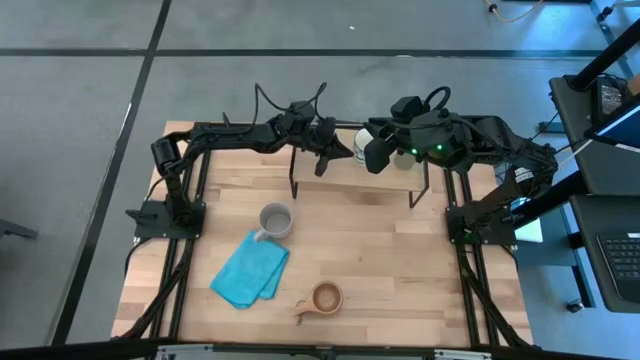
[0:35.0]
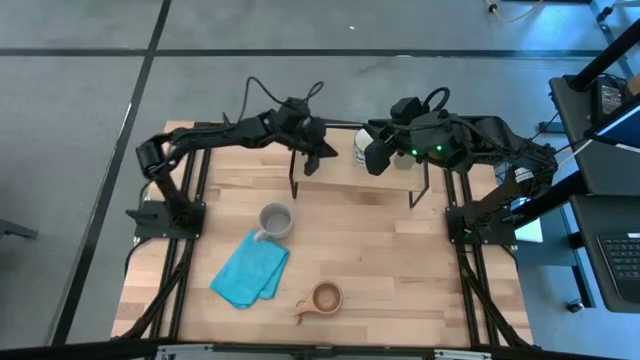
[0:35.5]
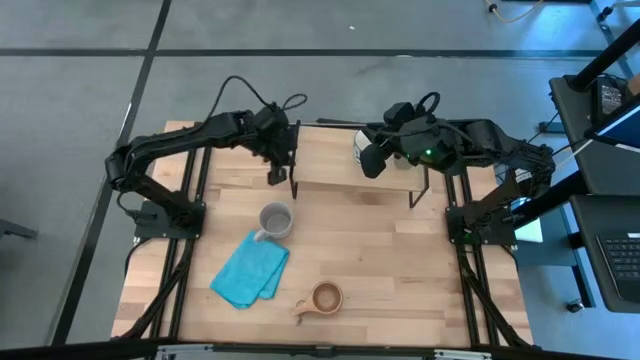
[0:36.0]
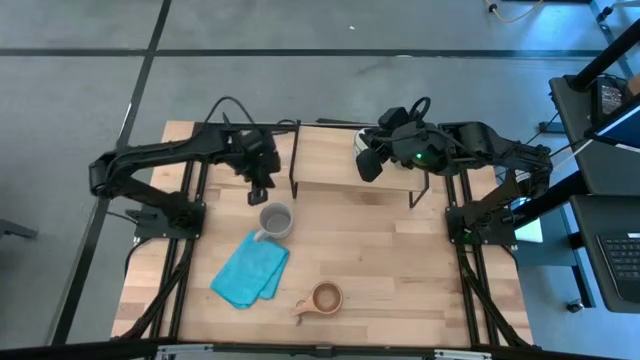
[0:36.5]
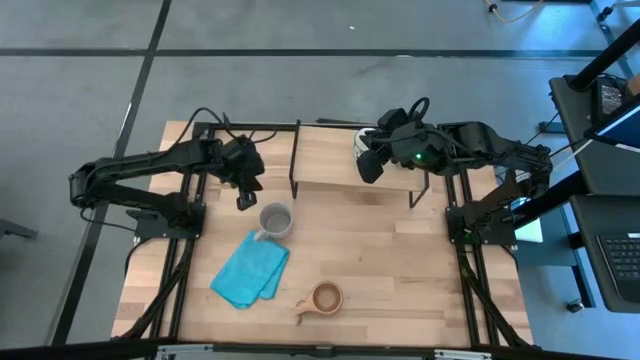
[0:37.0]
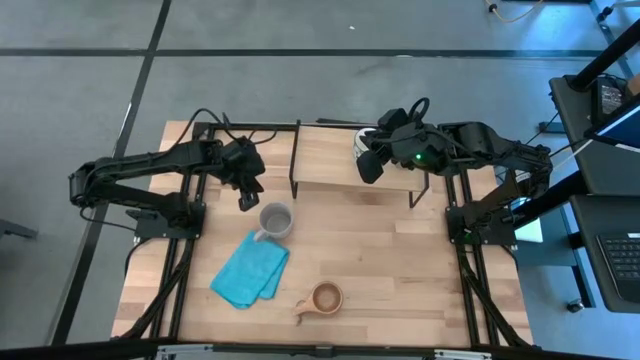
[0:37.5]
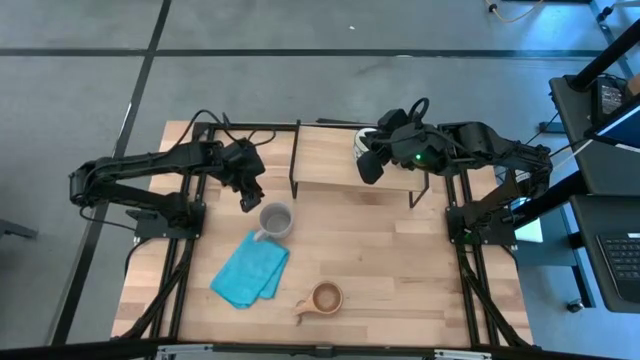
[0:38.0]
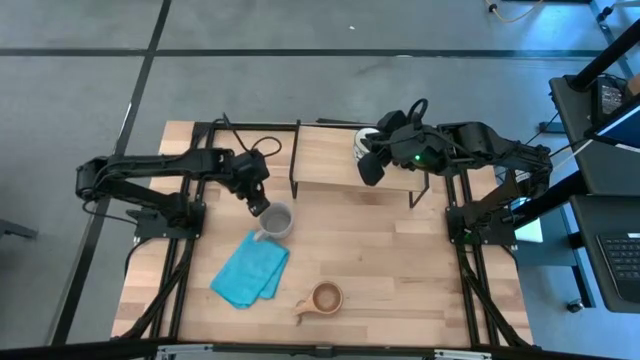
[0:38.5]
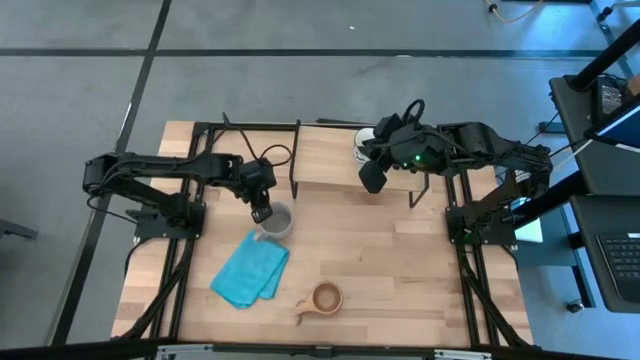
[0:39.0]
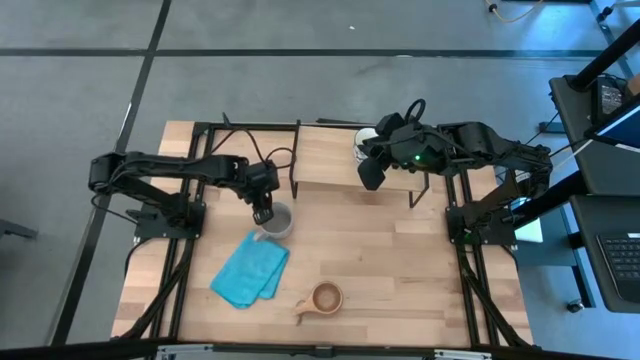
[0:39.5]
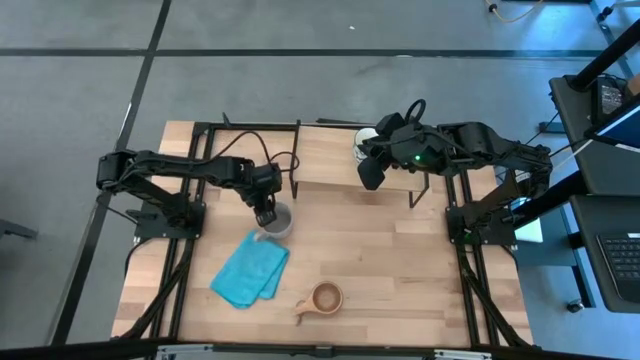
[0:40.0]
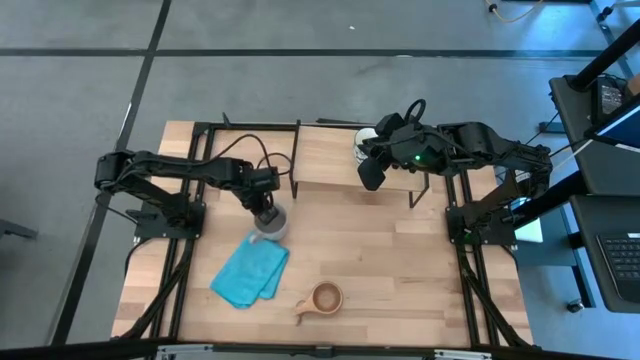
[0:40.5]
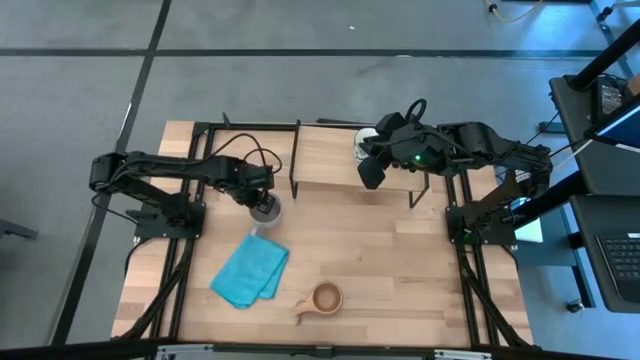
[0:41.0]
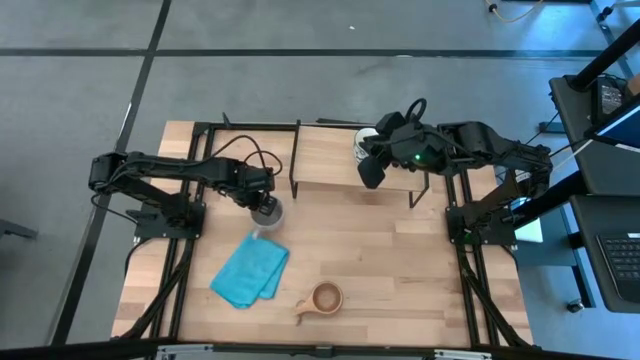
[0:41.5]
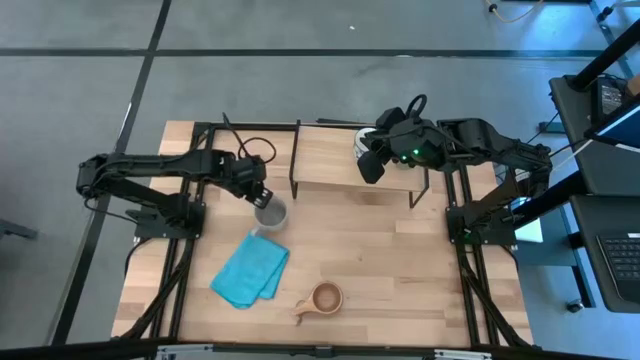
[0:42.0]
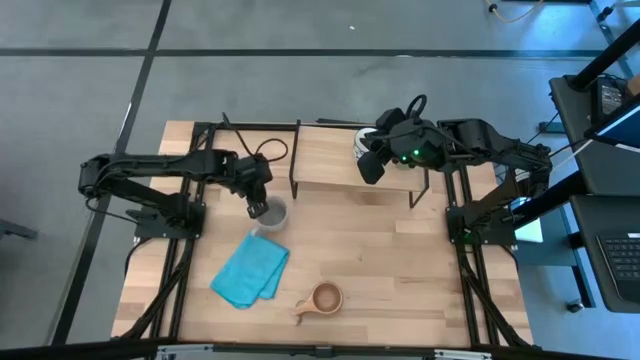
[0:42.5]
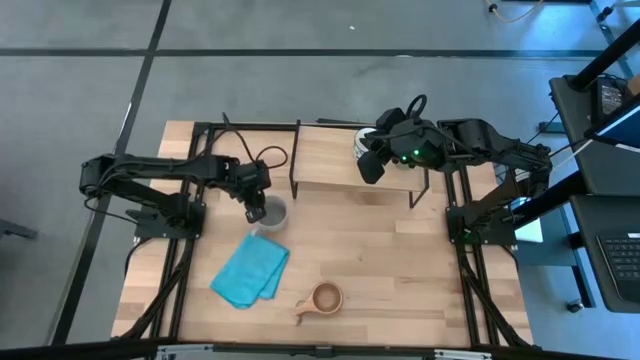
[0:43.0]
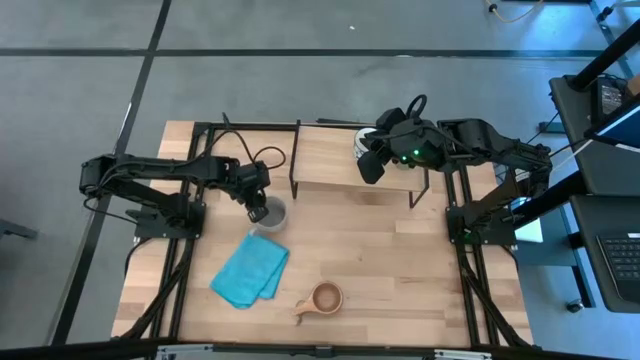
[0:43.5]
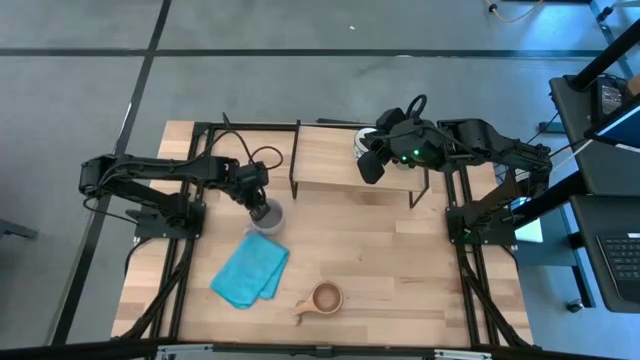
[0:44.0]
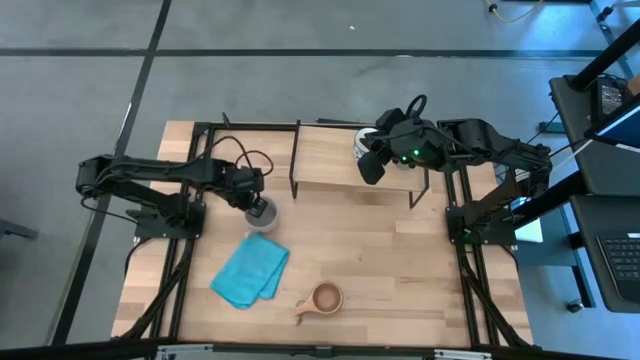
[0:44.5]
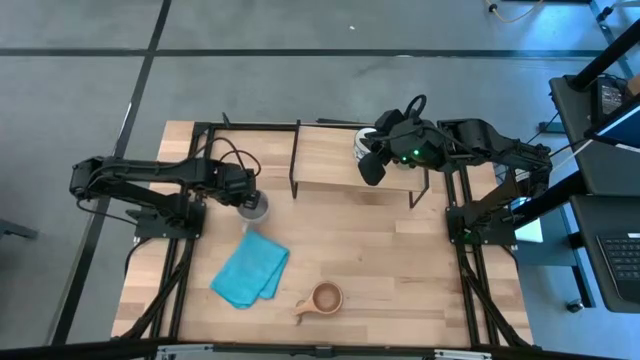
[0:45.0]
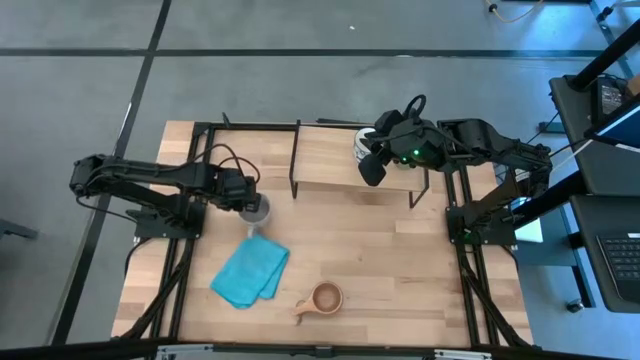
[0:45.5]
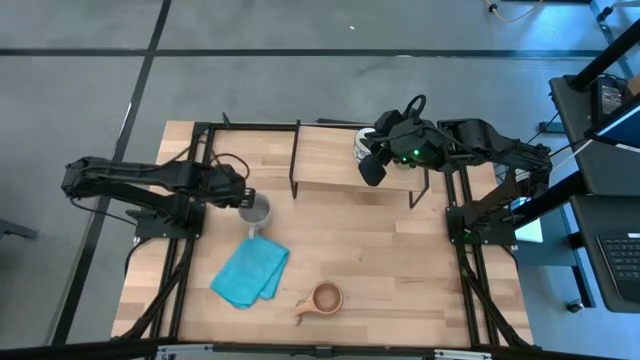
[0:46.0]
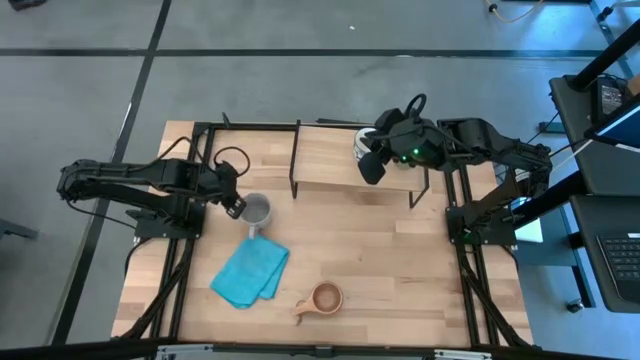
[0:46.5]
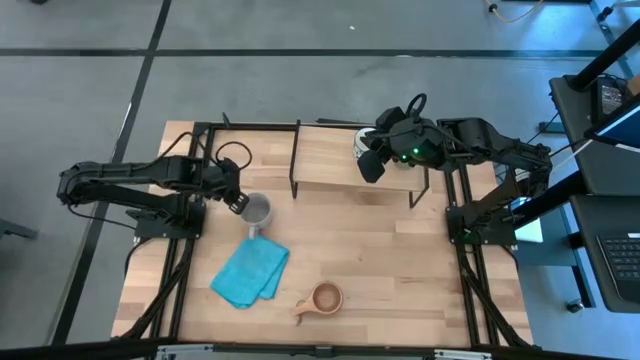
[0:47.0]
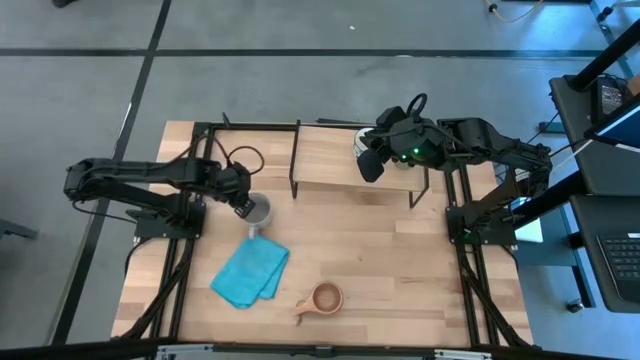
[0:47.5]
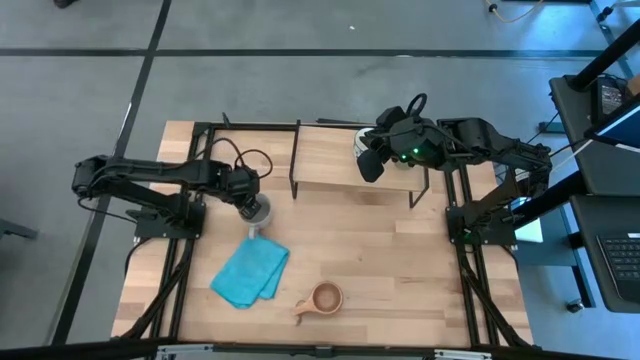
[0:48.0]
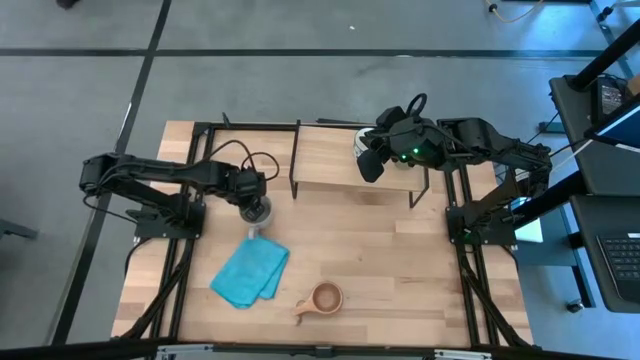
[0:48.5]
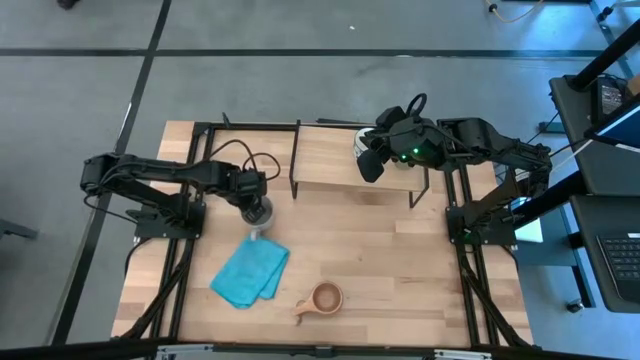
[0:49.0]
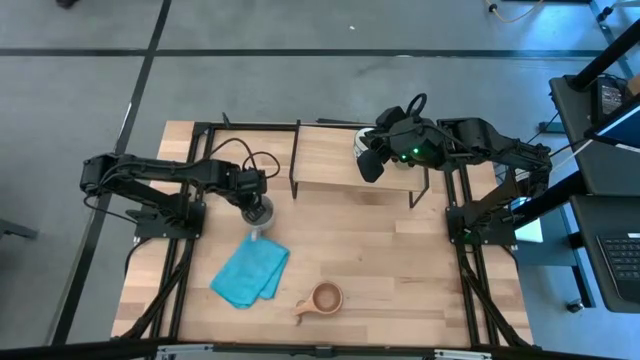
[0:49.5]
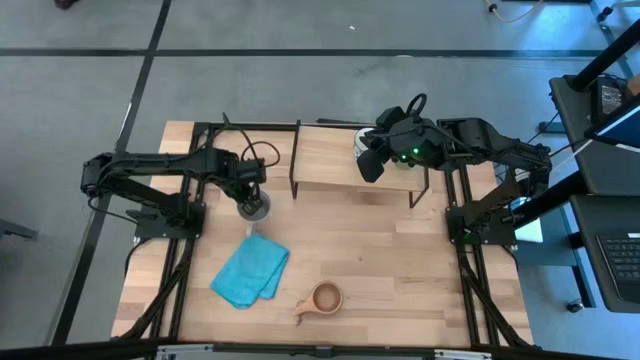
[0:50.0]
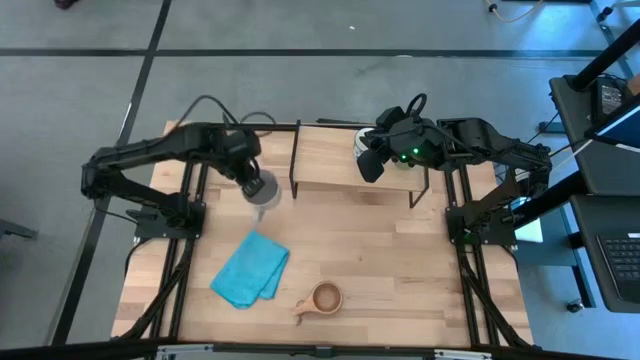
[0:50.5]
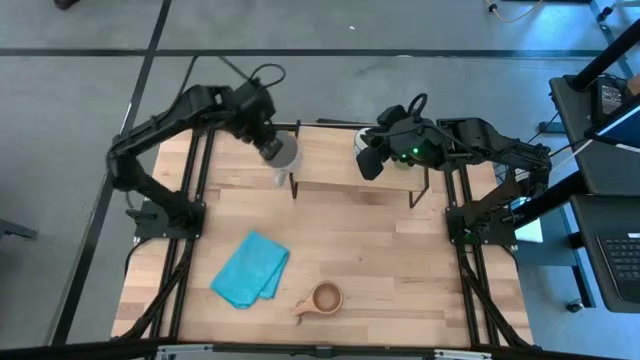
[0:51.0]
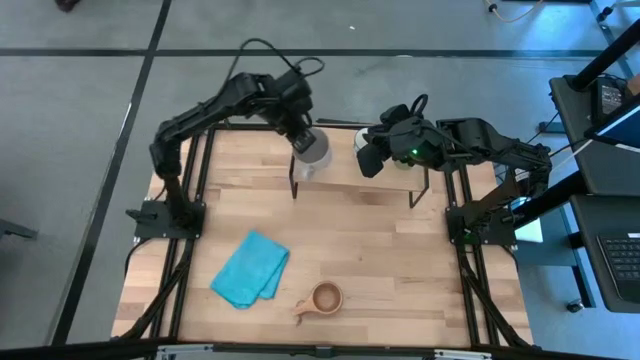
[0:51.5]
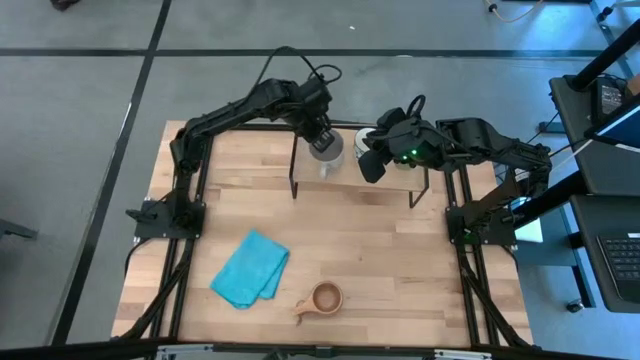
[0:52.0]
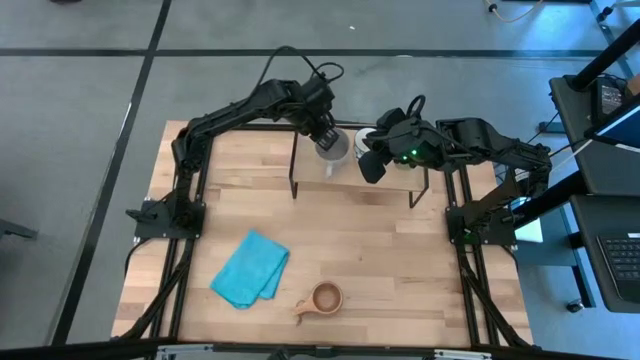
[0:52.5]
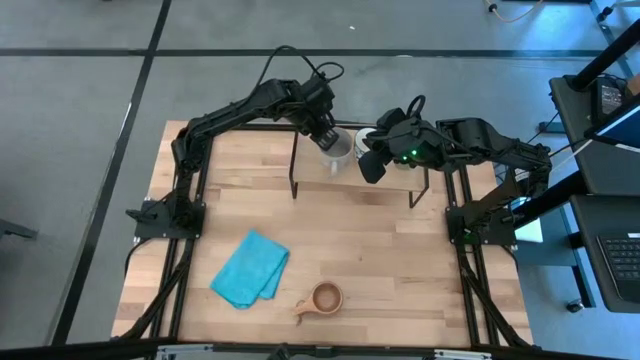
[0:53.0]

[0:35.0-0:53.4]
Task: Stack small to large cups/mugs on shelf
Put the gray mug on the shelf
